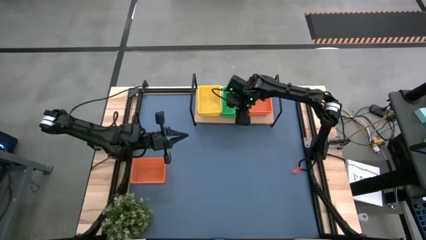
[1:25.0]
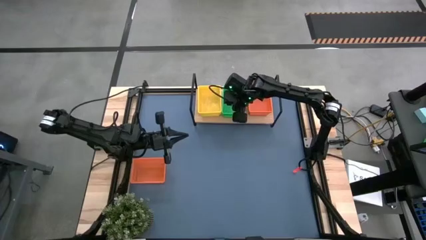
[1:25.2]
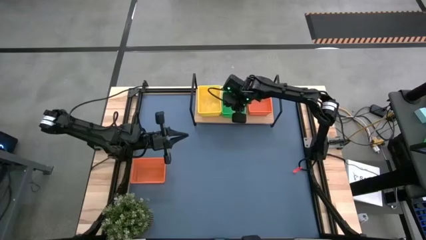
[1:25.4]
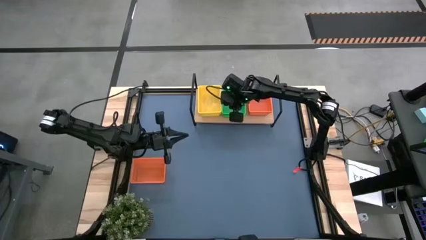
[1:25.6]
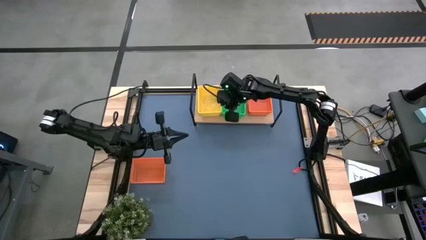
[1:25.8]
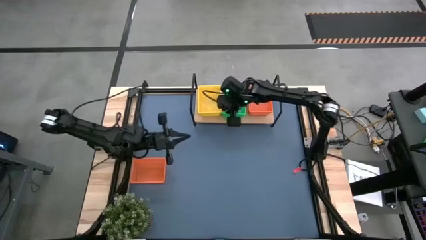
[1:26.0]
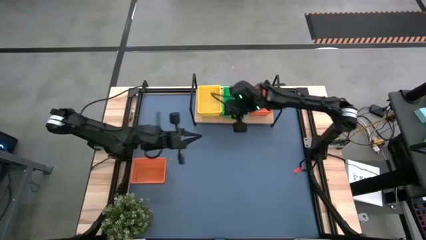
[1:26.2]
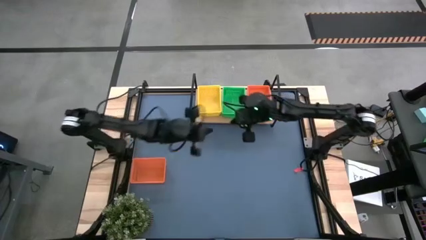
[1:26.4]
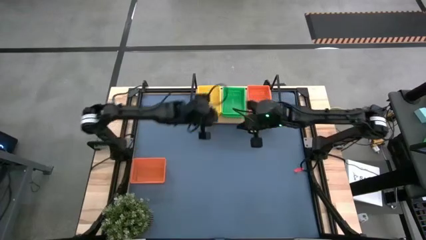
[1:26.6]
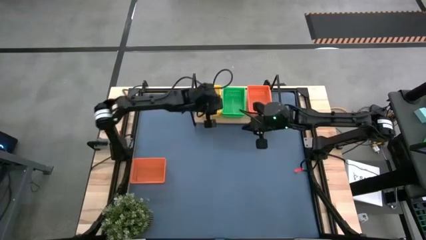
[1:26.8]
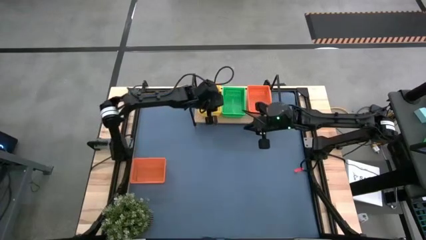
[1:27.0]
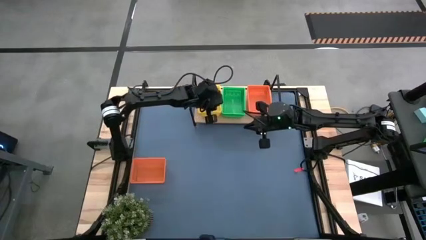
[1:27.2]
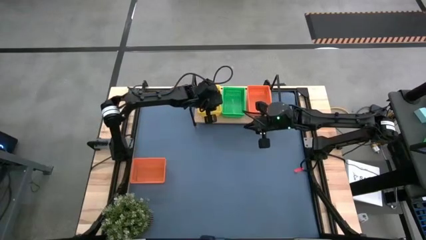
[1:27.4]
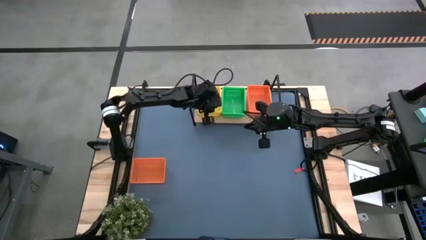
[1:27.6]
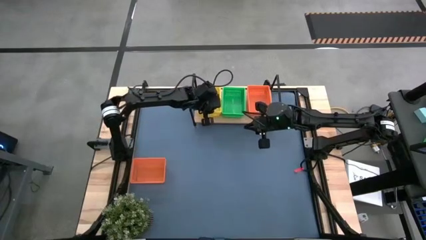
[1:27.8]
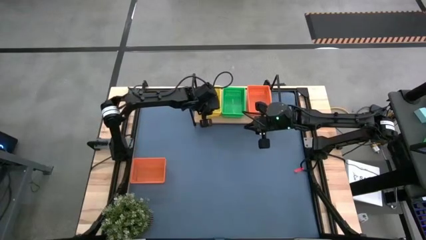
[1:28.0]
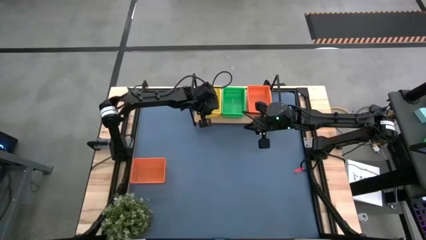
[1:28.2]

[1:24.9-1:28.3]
Task: Stack baskets on shelf by color
Adjust the yellow bins on the shelf

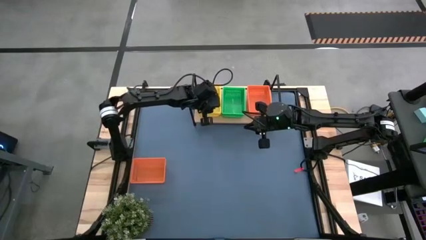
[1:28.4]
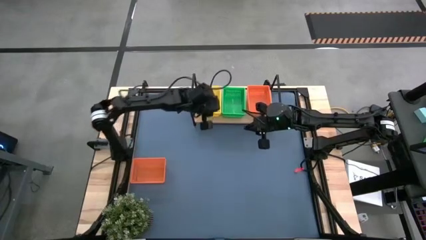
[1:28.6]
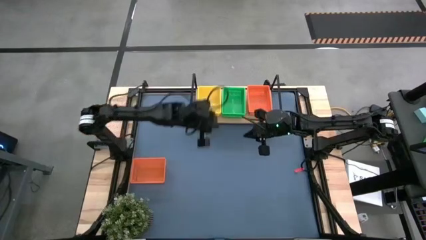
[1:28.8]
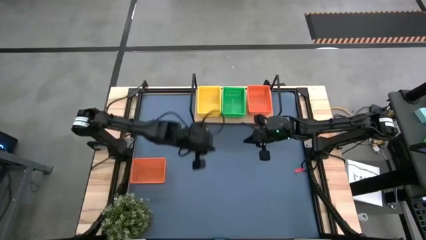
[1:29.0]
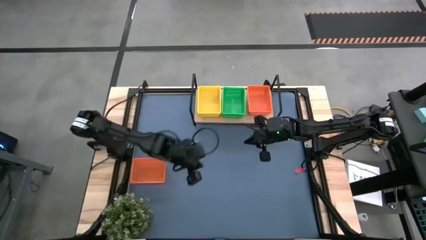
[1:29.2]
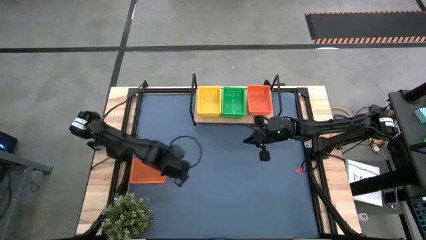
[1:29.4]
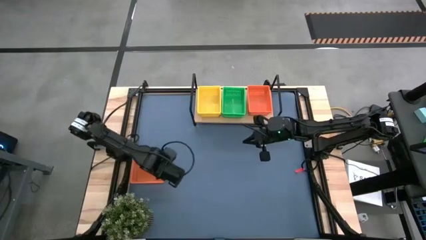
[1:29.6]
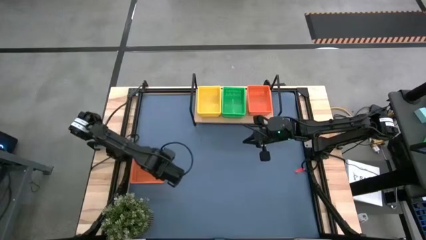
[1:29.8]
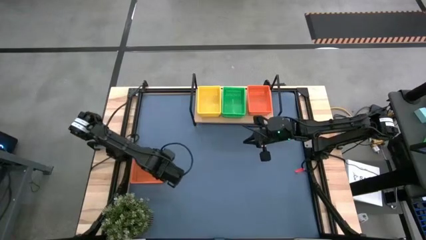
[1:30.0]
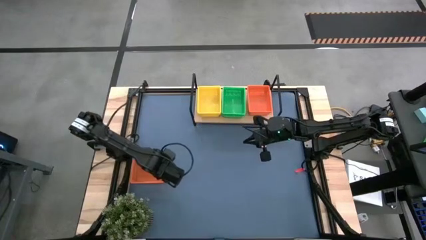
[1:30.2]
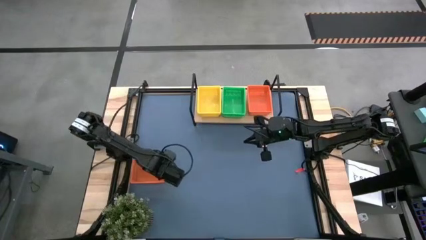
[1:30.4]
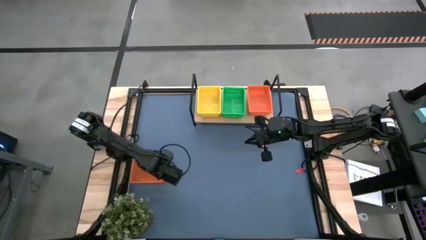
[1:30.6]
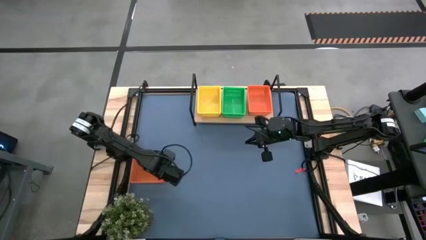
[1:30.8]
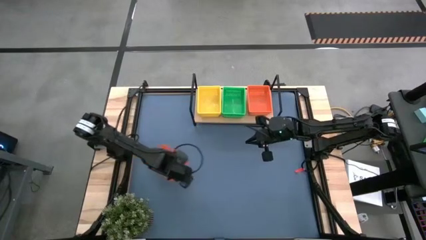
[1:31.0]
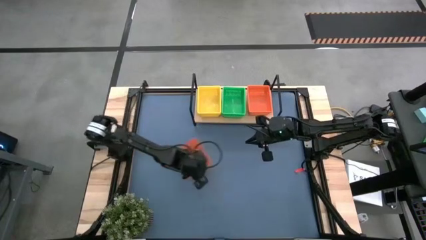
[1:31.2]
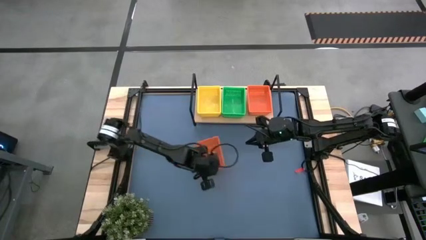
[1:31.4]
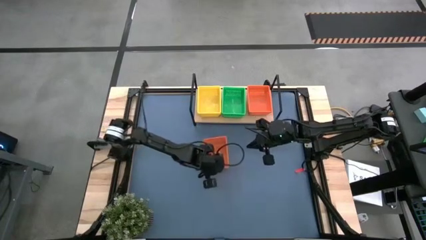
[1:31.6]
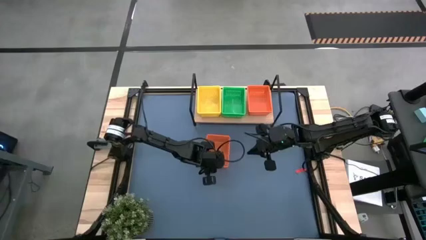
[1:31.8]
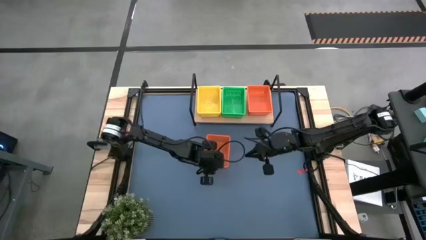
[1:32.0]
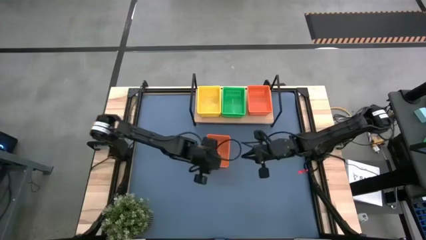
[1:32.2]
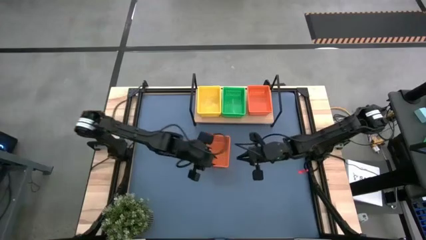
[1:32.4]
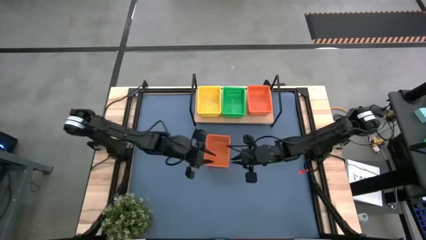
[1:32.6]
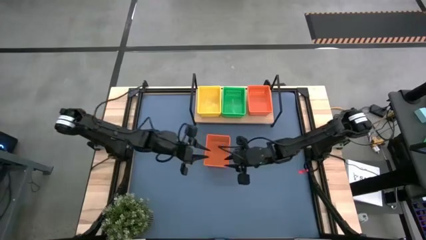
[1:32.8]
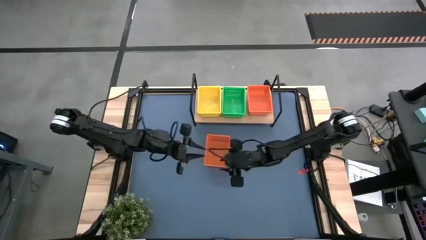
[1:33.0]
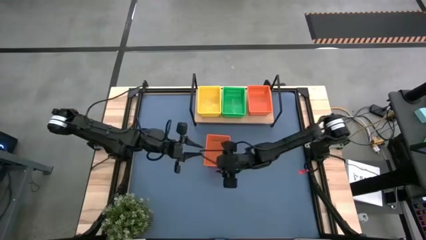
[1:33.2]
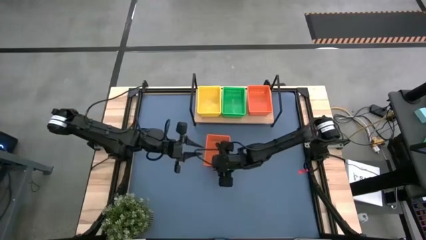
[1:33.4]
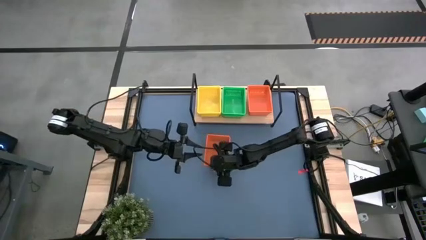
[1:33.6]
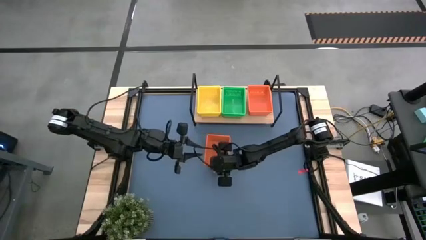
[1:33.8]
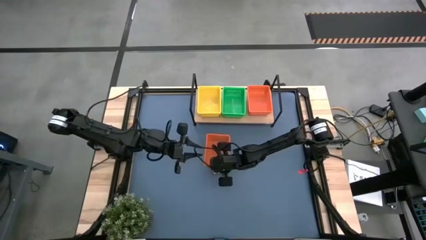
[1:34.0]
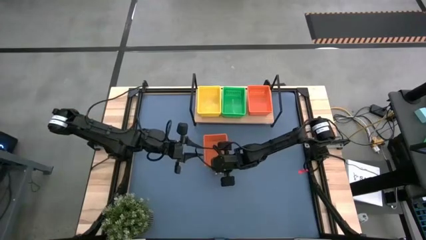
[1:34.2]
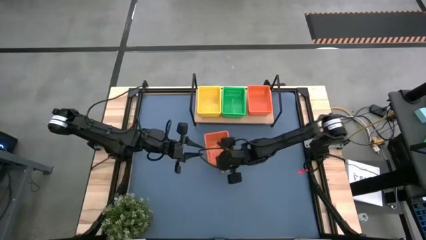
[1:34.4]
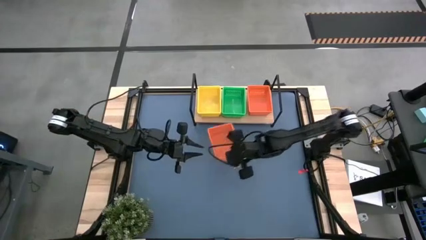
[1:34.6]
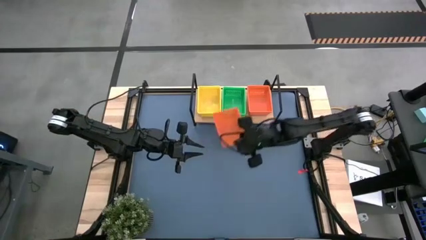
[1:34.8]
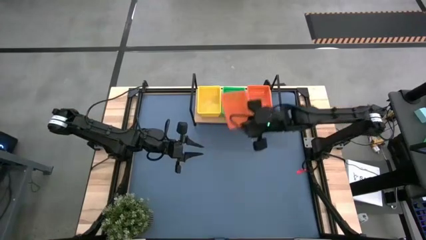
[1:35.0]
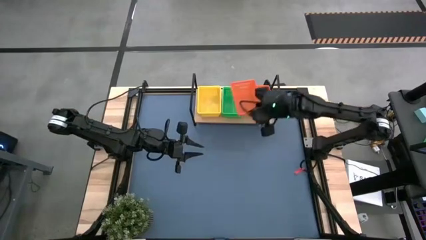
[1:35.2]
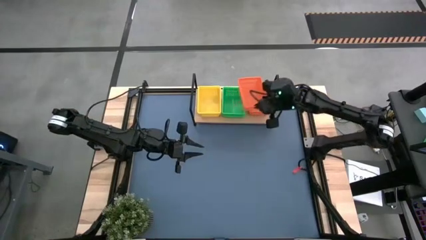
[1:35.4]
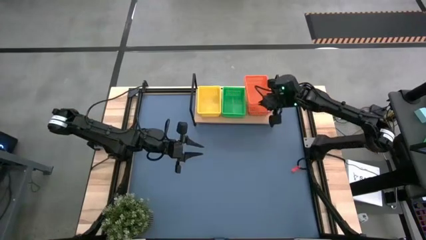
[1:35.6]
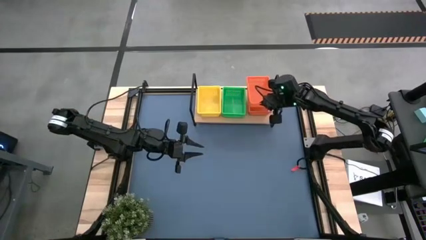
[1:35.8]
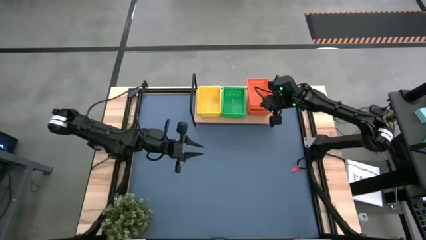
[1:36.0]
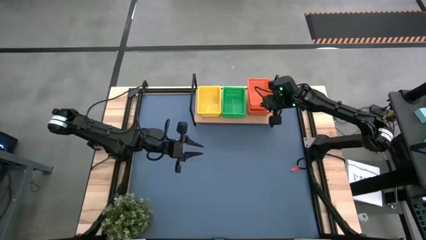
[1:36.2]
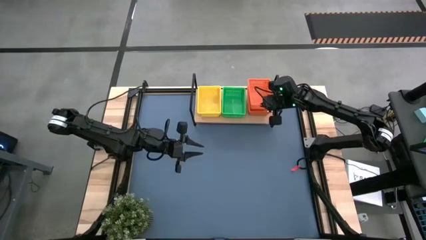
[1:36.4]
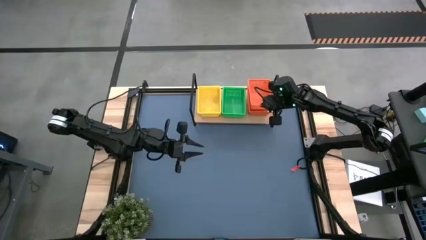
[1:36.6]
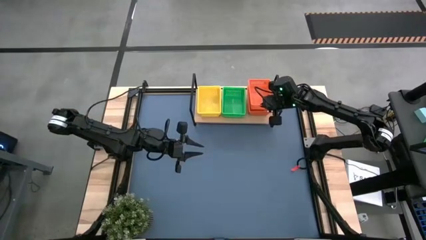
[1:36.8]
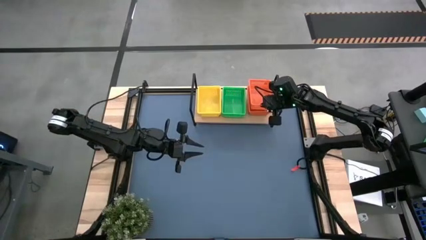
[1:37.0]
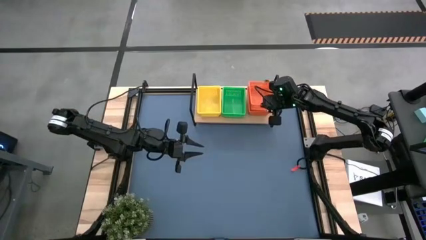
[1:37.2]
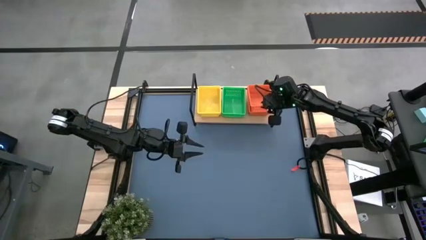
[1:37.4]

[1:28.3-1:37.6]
Stack the orange bin on top of the orange bin on the shelf

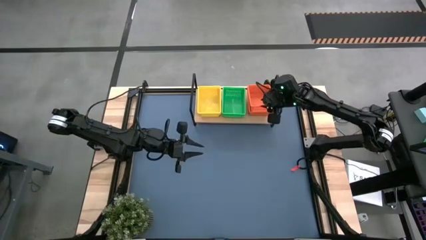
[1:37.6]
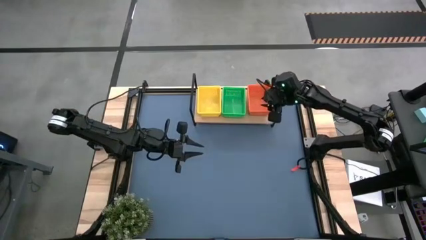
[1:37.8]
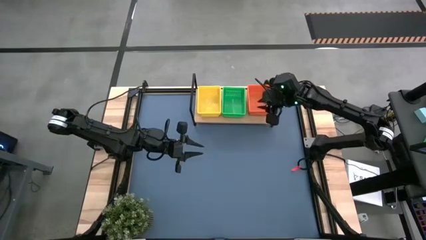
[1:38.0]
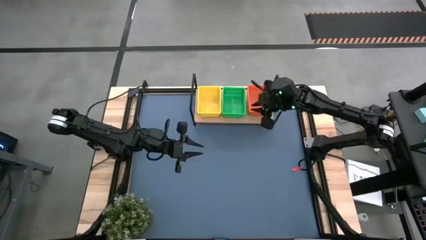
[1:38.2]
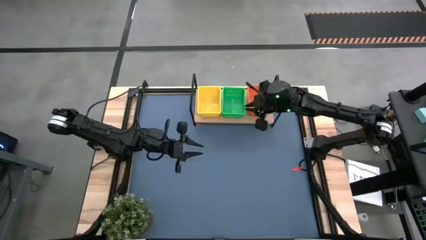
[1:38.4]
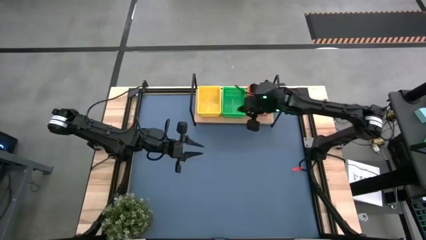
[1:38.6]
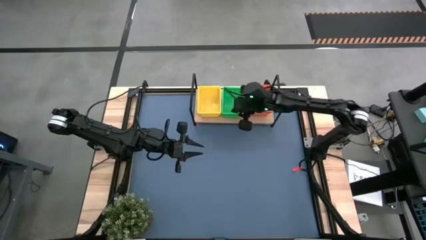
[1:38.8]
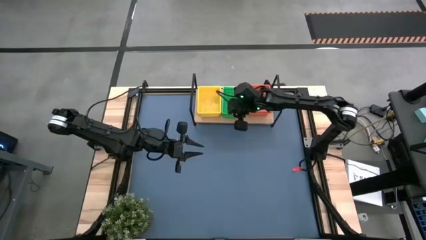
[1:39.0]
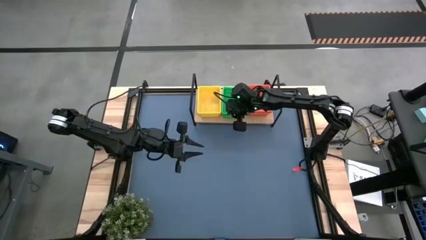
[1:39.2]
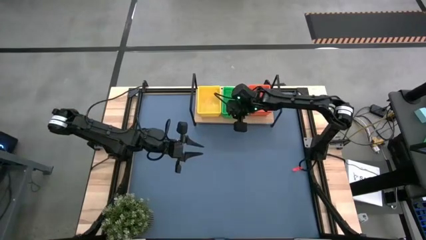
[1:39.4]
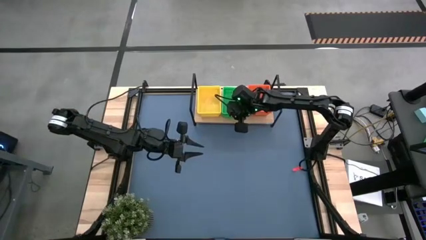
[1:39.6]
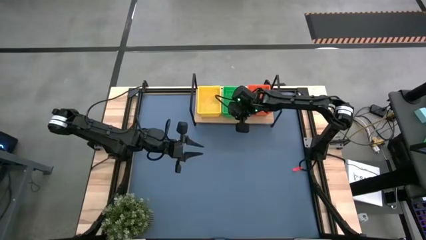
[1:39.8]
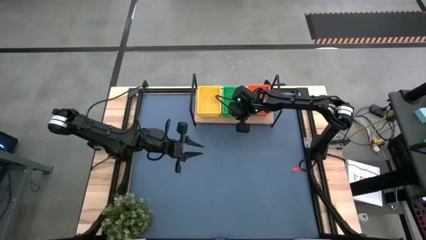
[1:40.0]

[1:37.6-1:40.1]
Adjust the green bins on the shelf

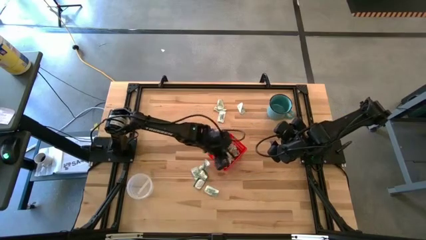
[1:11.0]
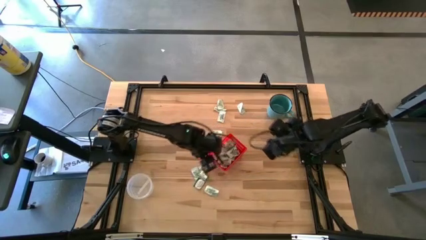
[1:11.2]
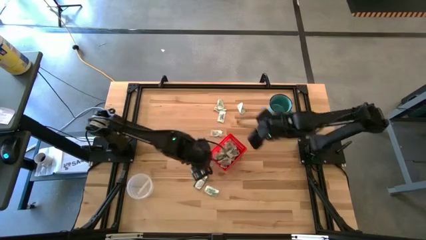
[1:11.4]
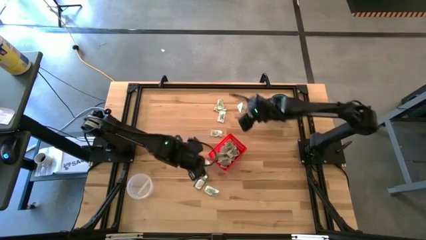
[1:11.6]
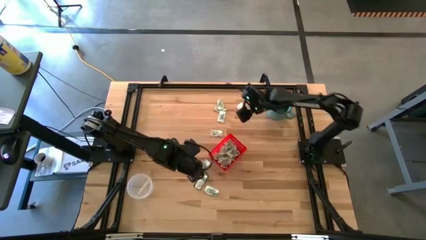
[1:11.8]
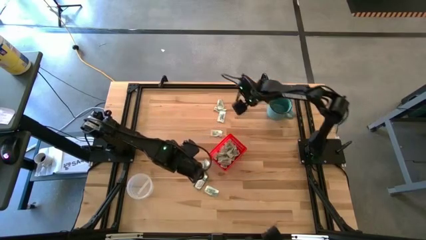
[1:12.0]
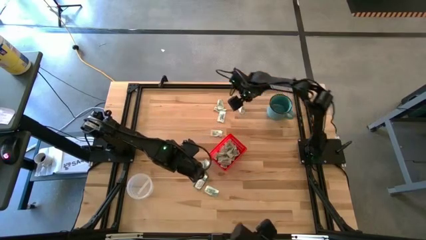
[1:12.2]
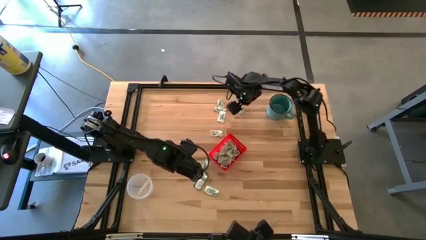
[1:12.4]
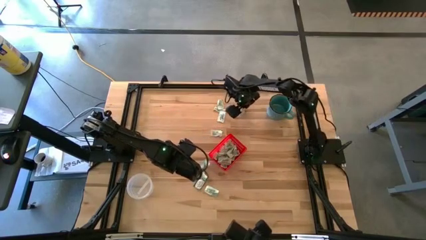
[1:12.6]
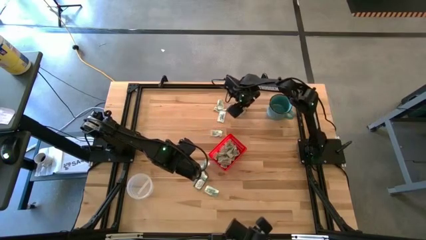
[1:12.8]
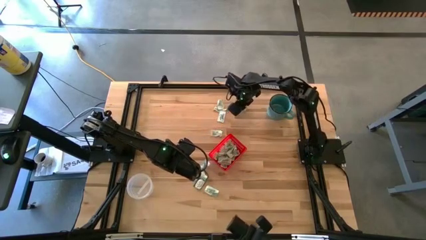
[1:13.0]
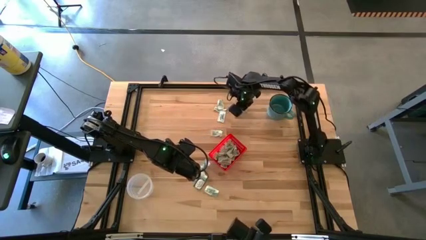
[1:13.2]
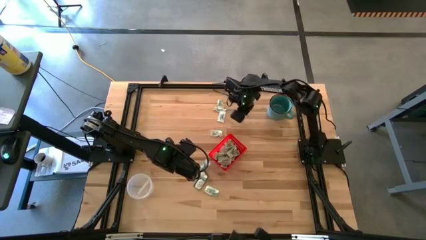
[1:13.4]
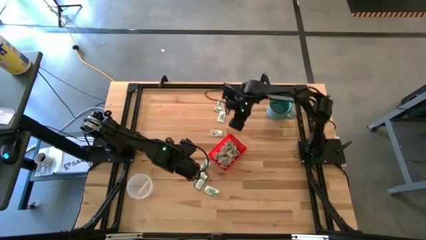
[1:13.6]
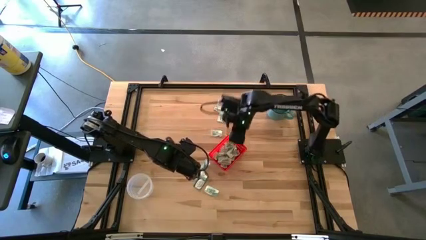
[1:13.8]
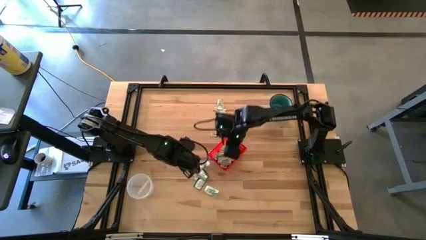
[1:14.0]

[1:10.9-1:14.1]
Task: Pick and place items into bin
Put the white stevia pack into the red bin
